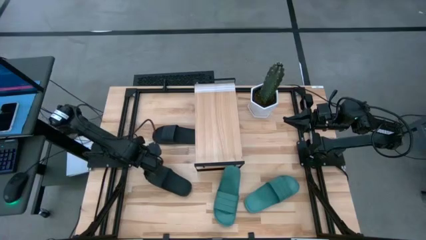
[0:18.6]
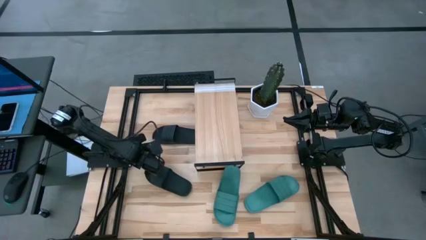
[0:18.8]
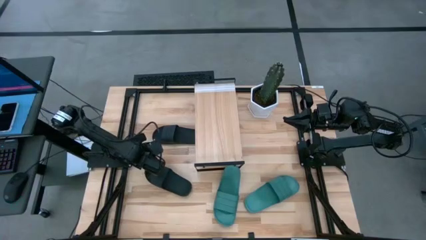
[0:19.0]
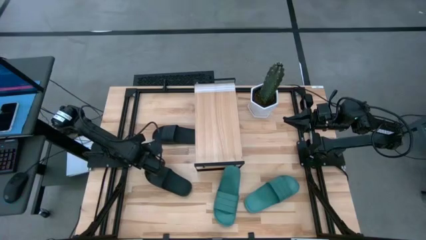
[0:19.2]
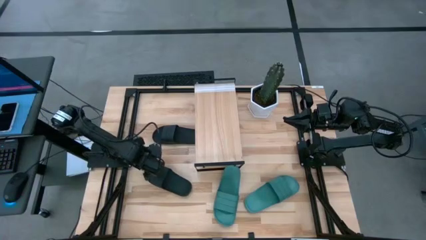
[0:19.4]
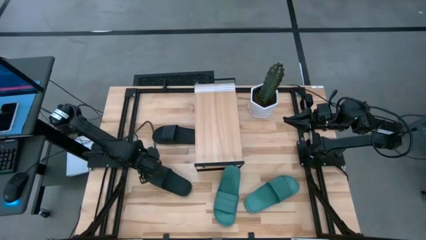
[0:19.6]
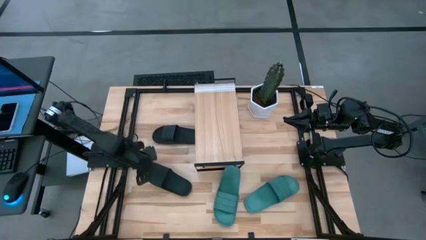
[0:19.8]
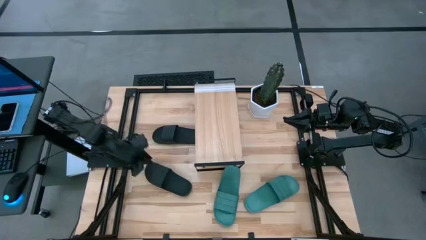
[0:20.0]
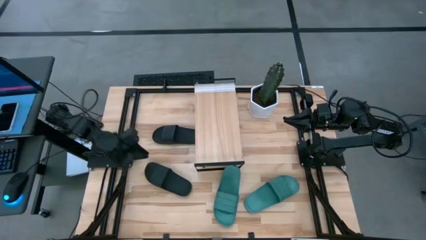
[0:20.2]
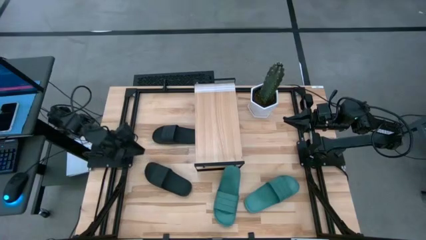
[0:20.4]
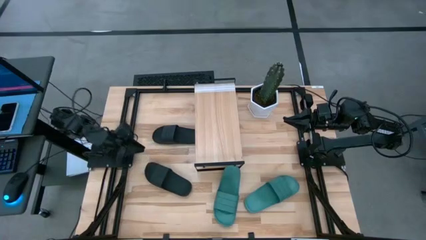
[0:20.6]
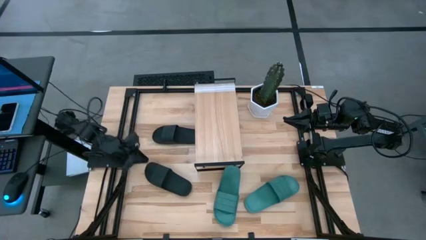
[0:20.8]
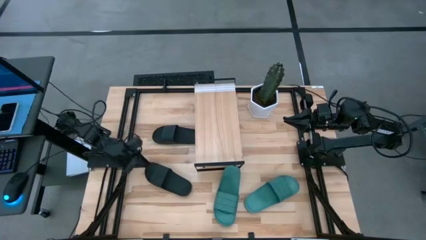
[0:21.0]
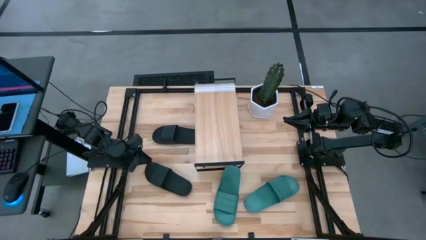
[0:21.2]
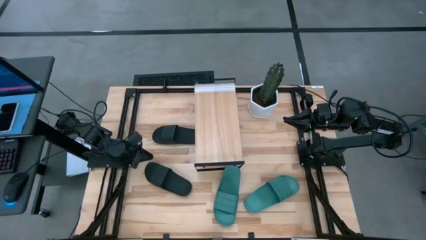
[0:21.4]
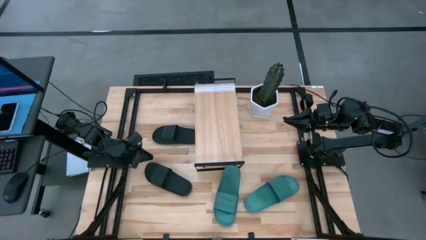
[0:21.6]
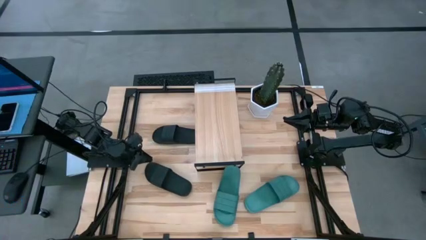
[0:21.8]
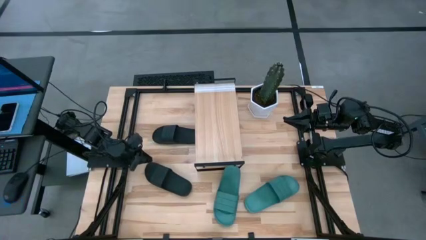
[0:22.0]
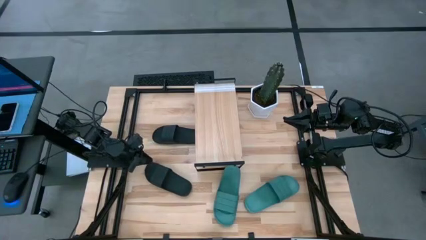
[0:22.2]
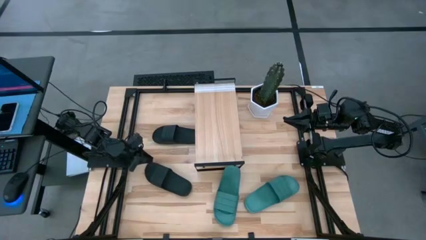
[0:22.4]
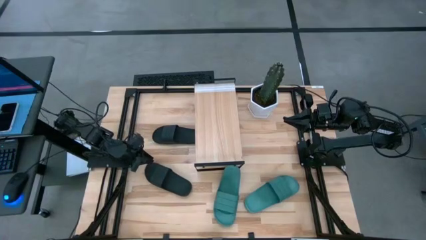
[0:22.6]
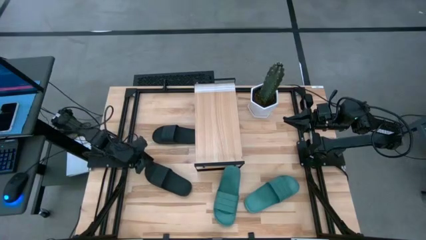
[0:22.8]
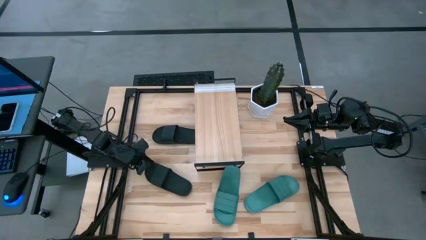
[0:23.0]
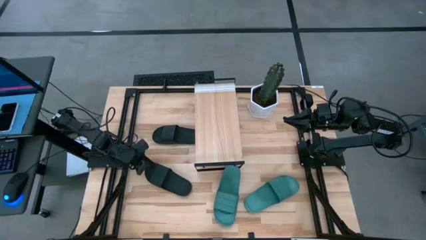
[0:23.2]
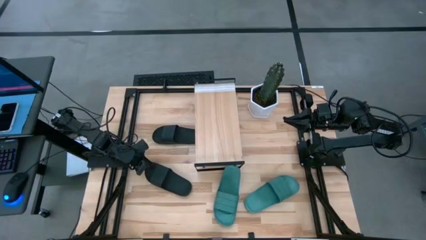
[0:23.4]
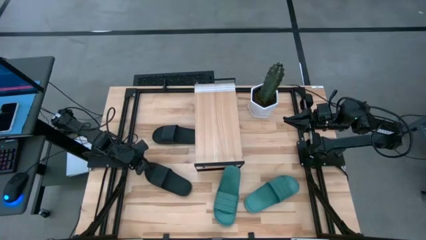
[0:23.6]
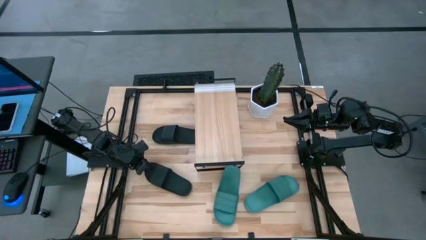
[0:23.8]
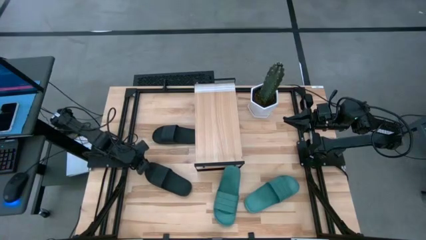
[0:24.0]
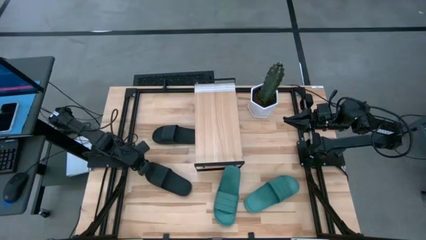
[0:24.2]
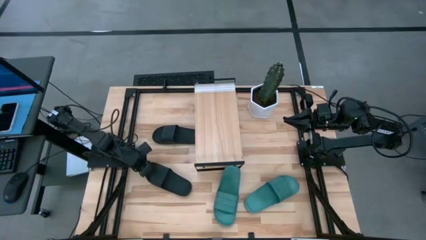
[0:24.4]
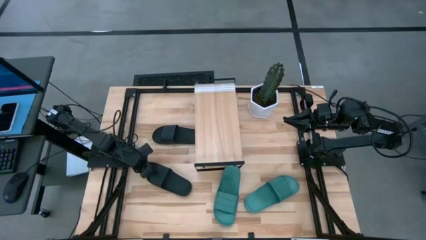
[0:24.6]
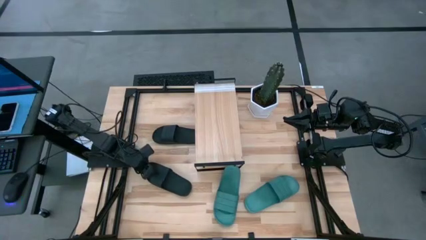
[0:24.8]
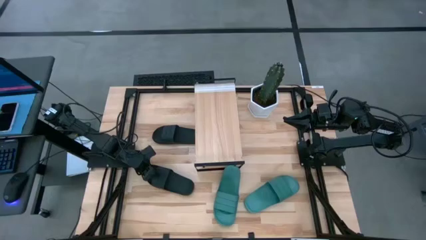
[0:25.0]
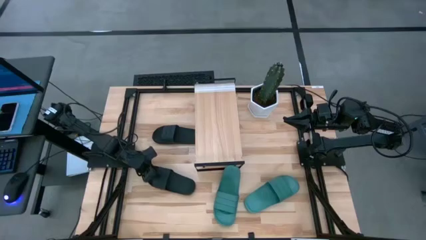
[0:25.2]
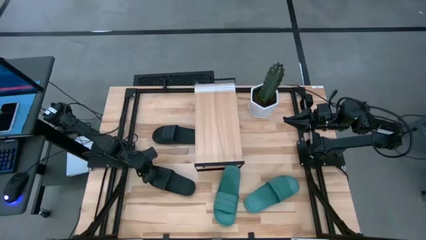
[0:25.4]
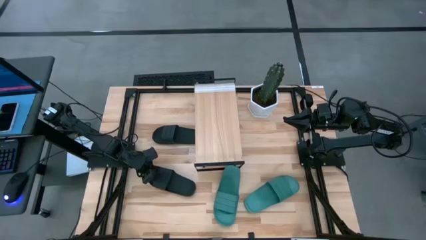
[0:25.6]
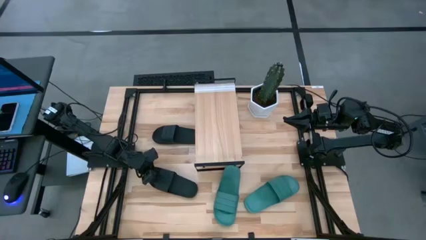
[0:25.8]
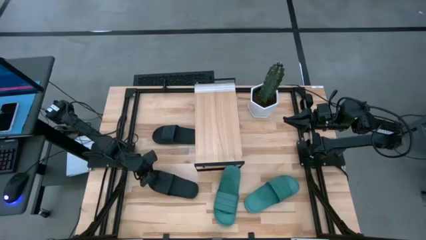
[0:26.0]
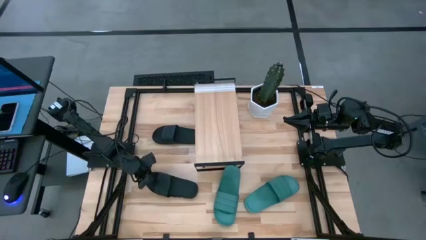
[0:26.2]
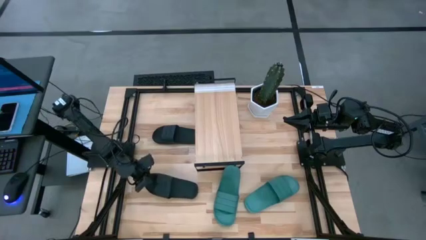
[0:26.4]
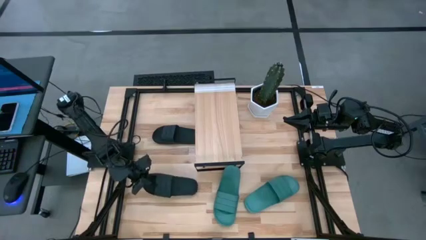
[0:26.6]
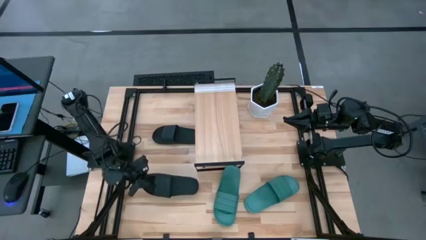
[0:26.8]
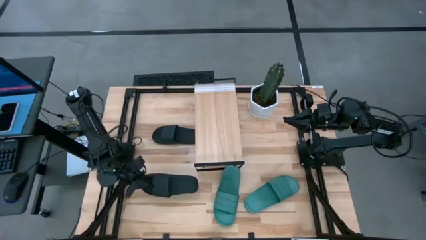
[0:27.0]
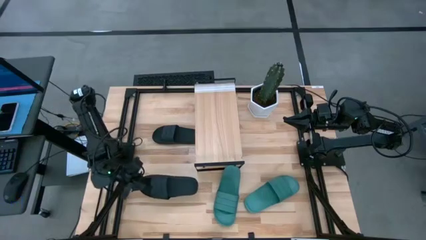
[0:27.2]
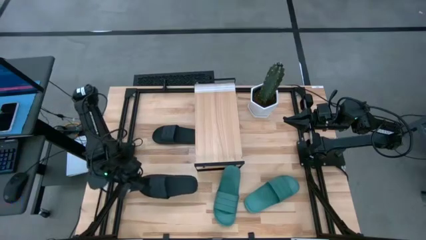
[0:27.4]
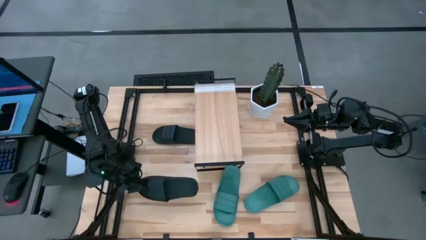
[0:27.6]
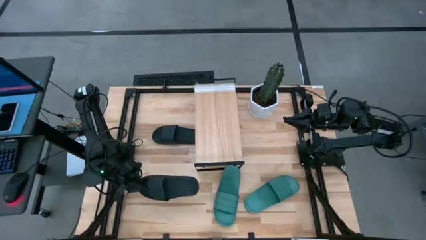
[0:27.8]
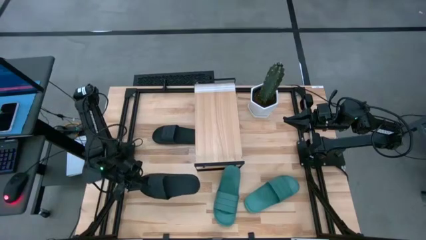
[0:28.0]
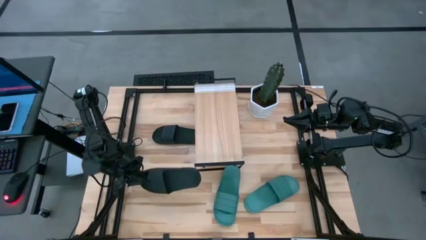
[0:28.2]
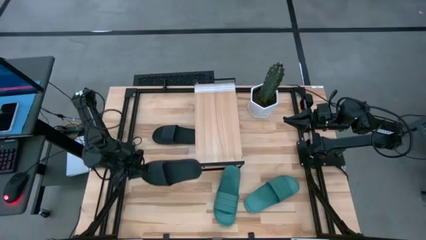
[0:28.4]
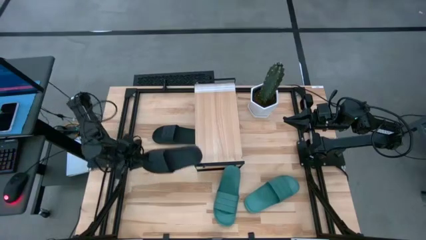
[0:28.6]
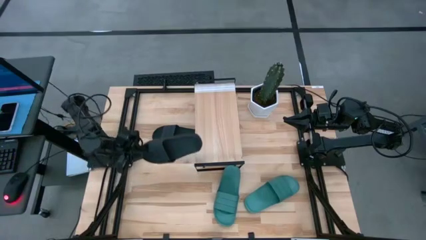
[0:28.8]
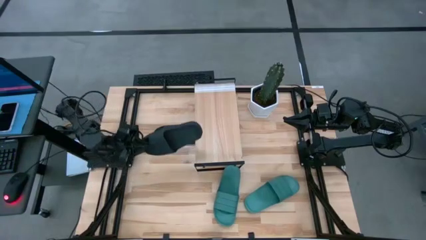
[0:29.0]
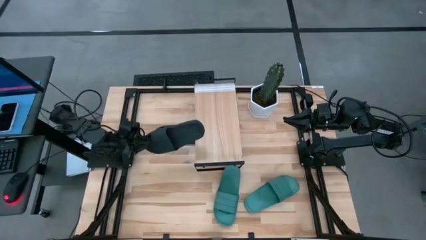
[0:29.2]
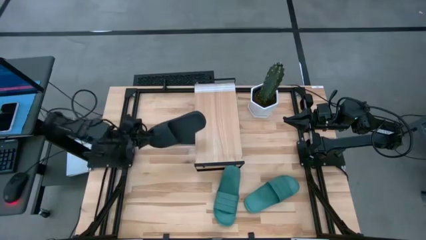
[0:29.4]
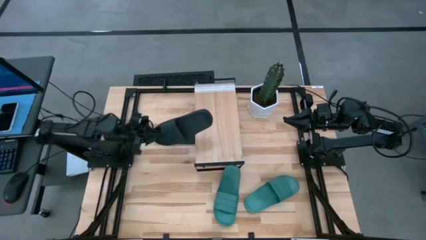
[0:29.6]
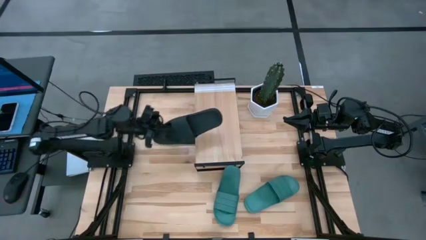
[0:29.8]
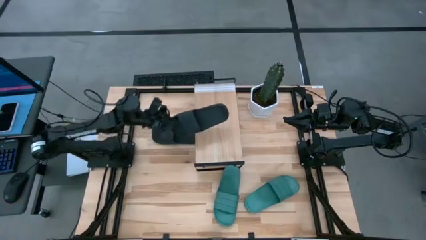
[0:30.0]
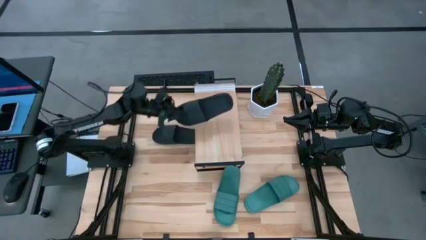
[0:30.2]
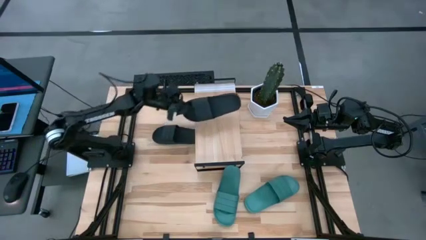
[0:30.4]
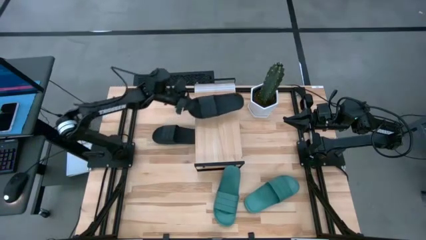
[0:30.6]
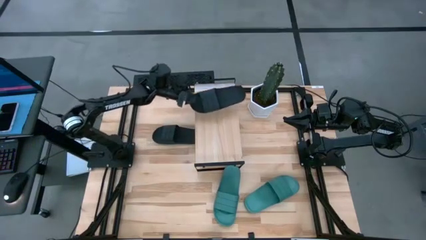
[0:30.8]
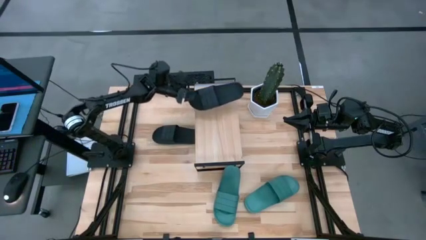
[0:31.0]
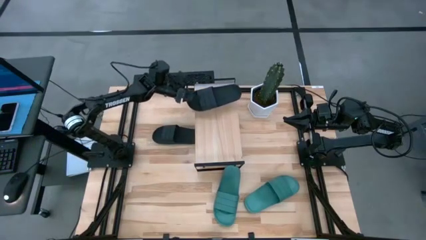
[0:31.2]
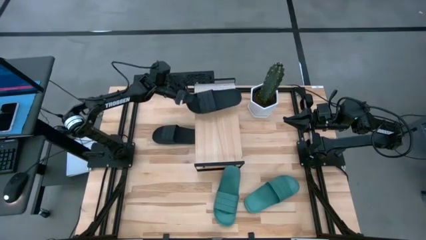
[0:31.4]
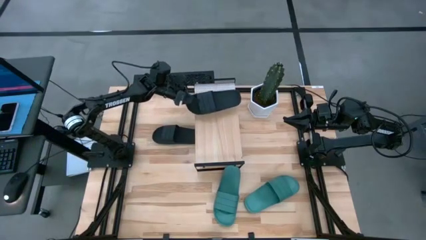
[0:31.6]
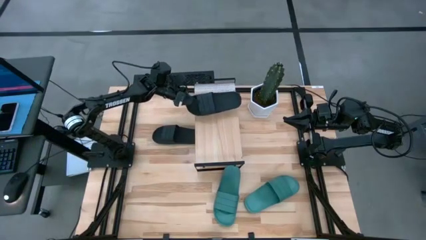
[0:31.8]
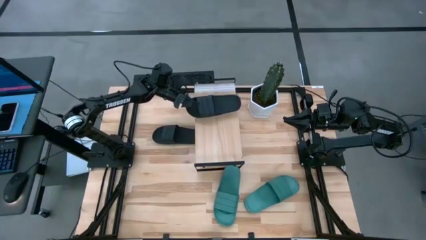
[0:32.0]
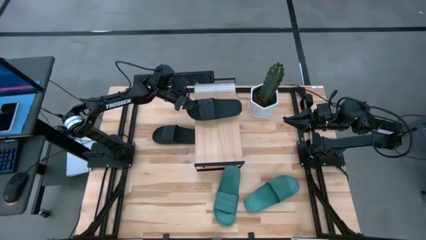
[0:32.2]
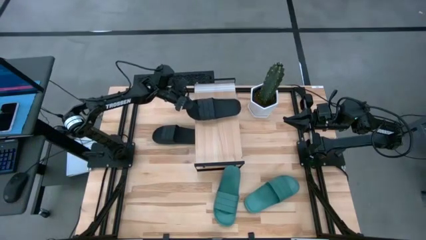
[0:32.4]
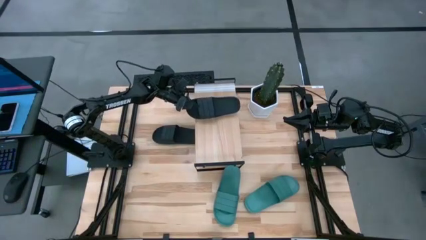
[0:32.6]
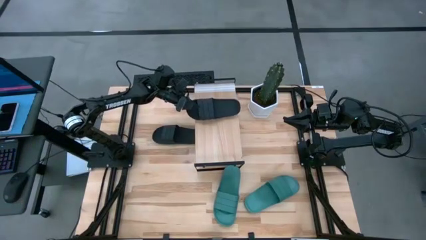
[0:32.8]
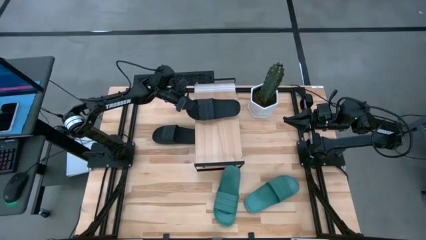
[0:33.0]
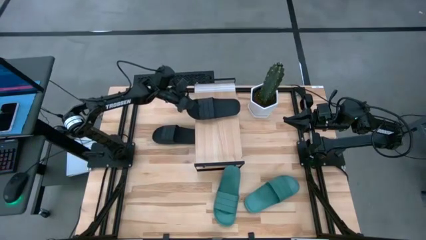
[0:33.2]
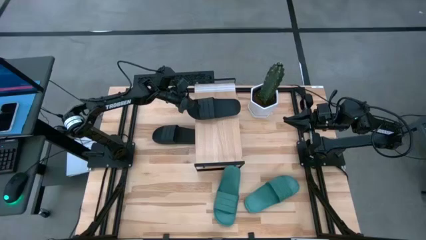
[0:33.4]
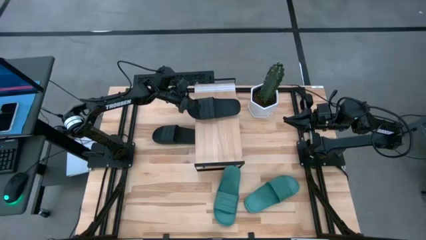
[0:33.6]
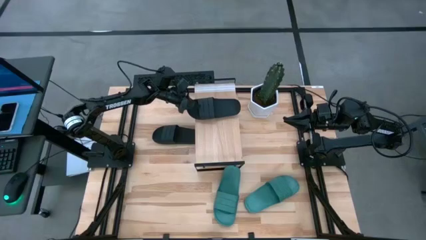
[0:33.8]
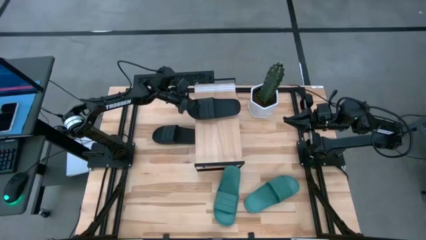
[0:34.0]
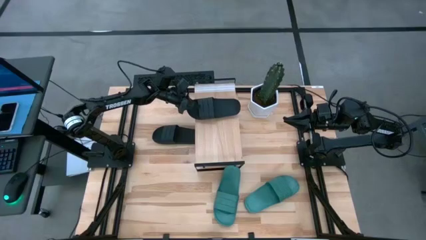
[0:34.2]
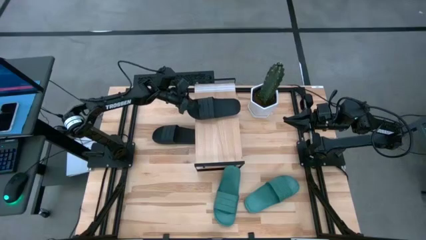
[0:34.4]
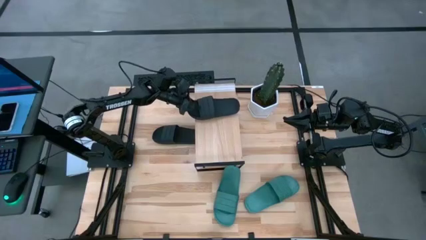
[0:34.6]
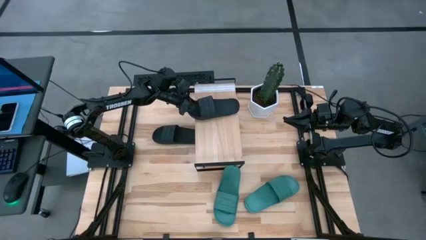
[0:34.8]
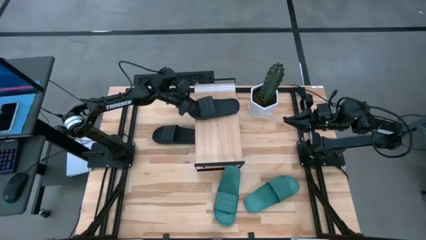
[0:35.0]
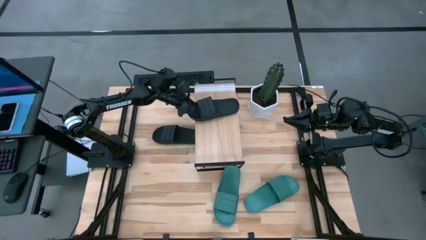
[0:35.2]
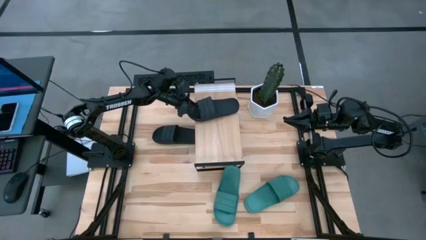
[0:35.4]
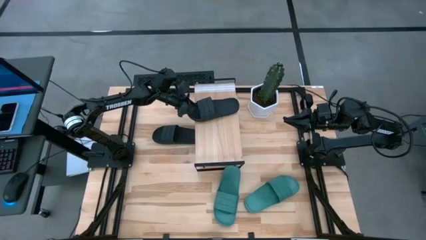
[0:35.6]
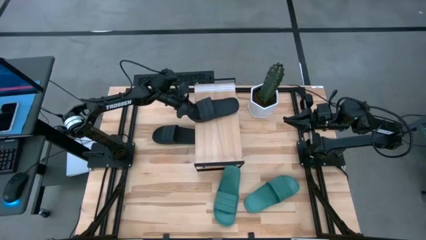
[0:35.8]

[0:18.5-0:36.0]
Task: Pick and place slides into the shelf
Put the bottom black slipper on the shelf
